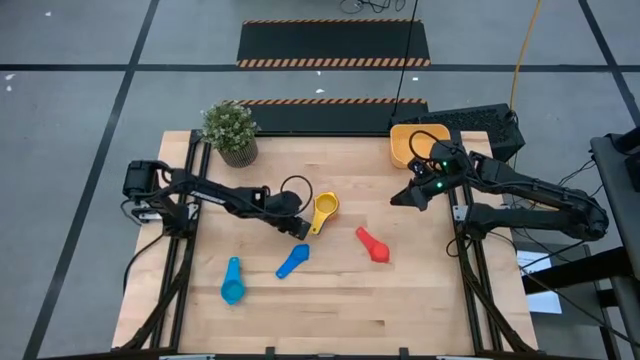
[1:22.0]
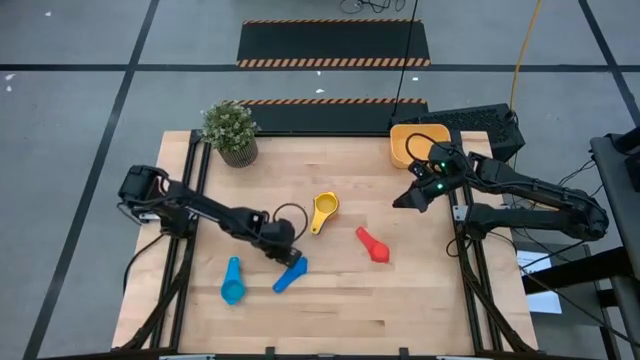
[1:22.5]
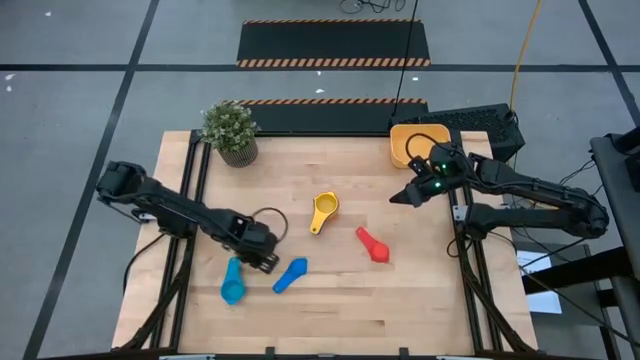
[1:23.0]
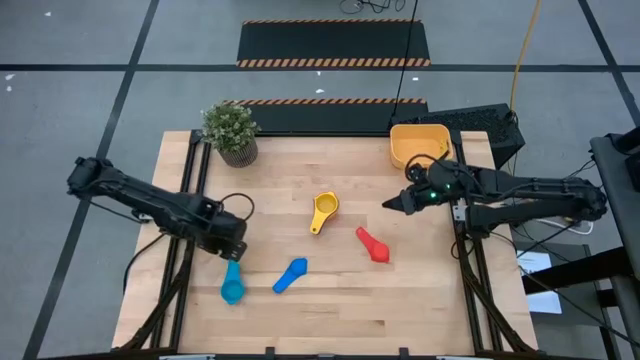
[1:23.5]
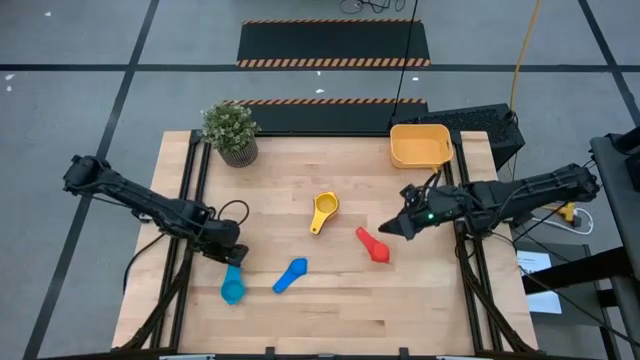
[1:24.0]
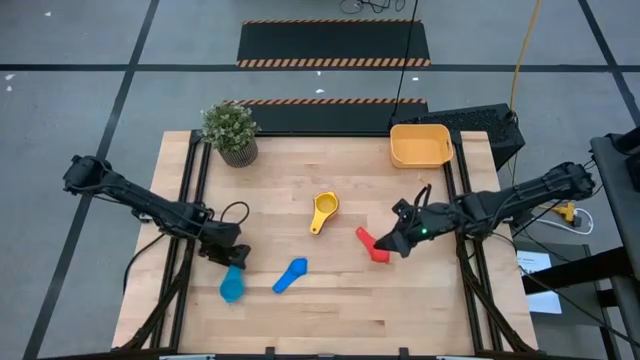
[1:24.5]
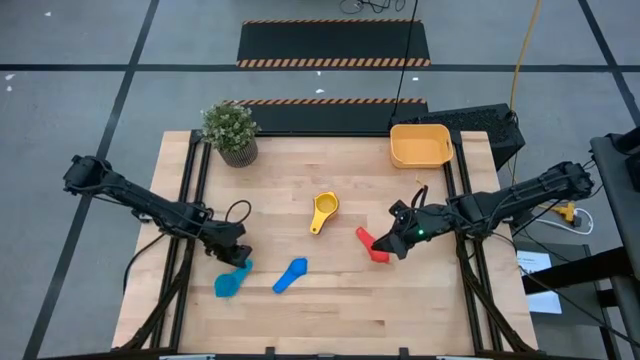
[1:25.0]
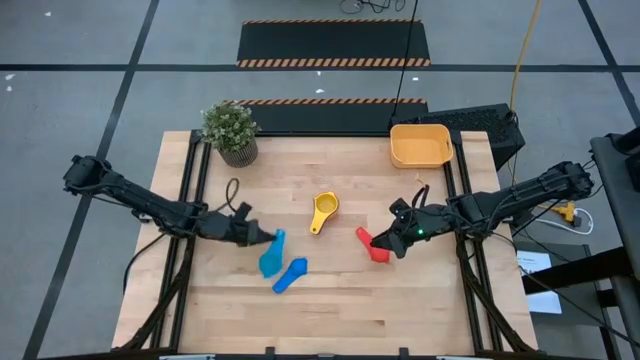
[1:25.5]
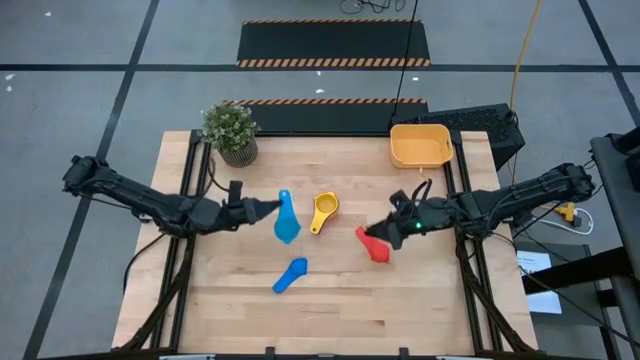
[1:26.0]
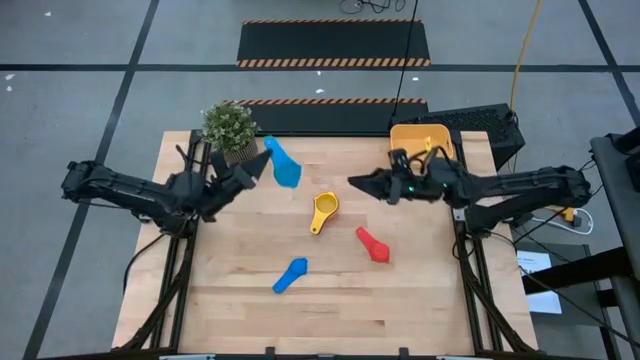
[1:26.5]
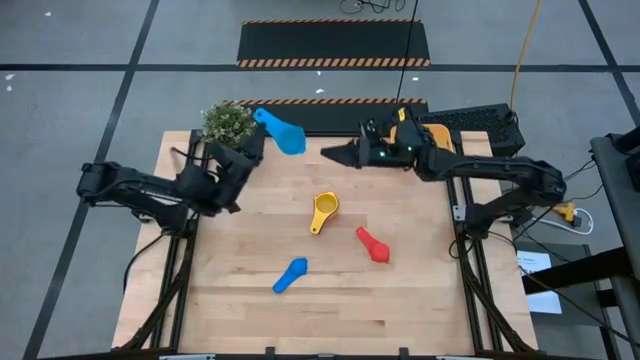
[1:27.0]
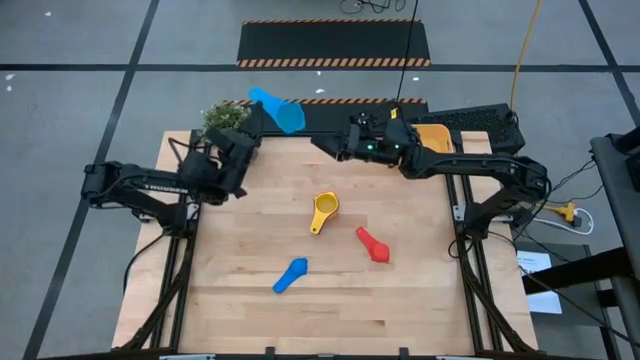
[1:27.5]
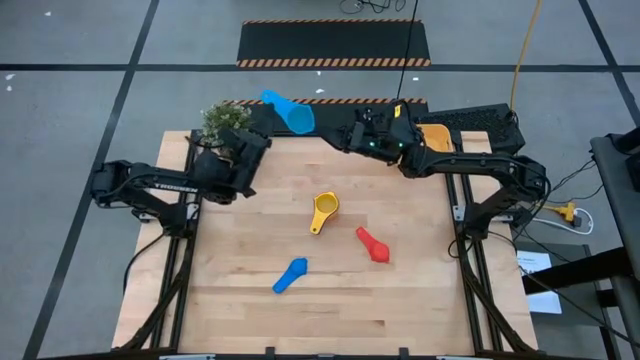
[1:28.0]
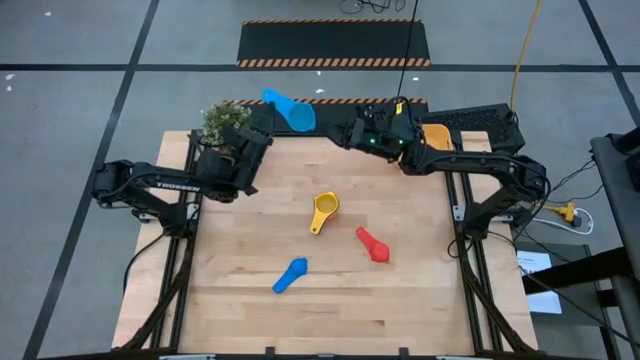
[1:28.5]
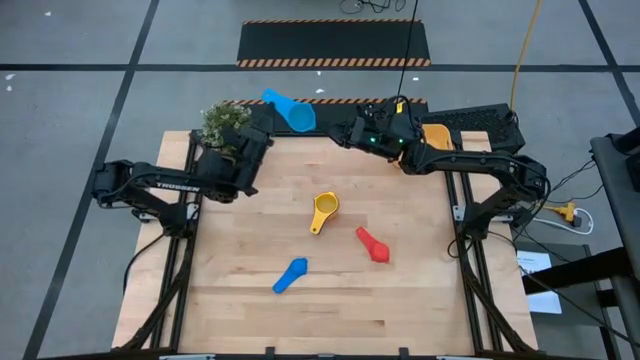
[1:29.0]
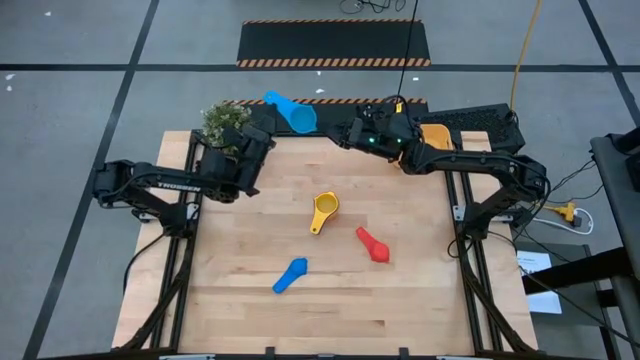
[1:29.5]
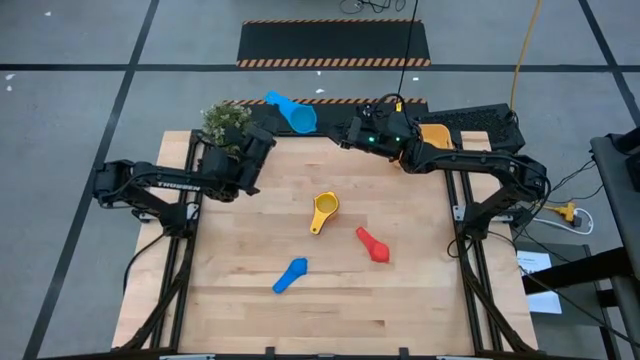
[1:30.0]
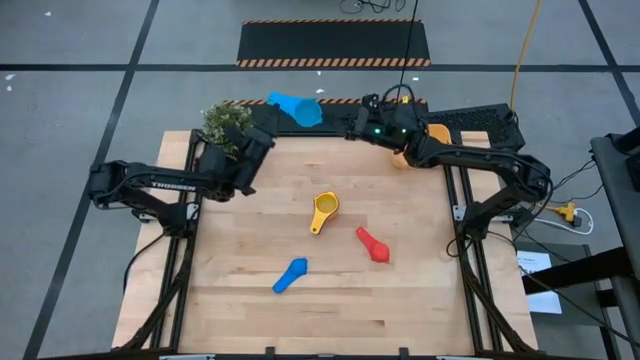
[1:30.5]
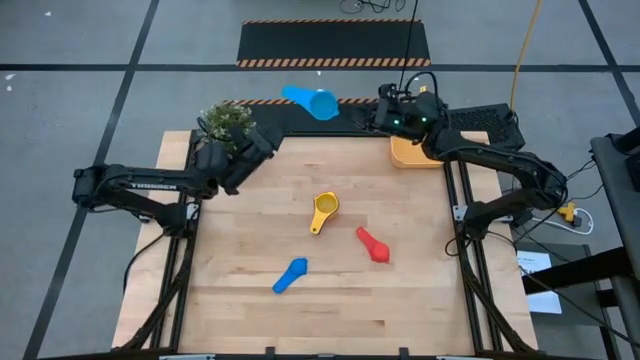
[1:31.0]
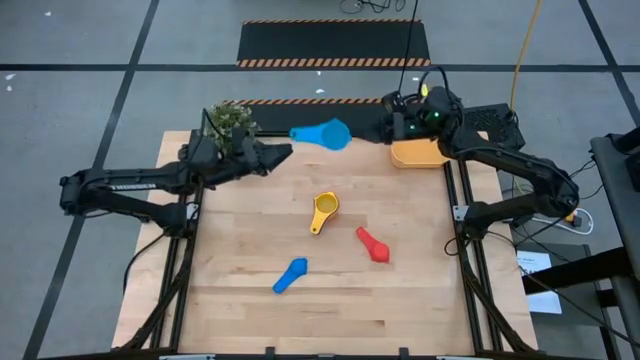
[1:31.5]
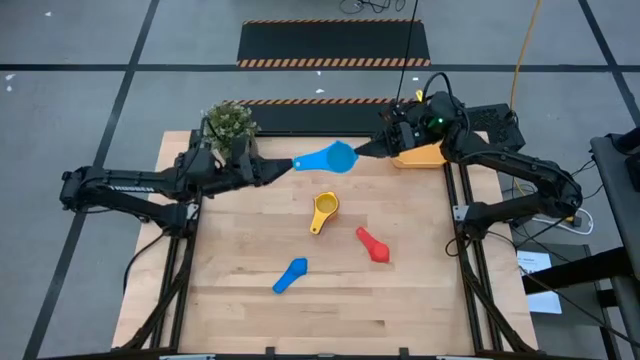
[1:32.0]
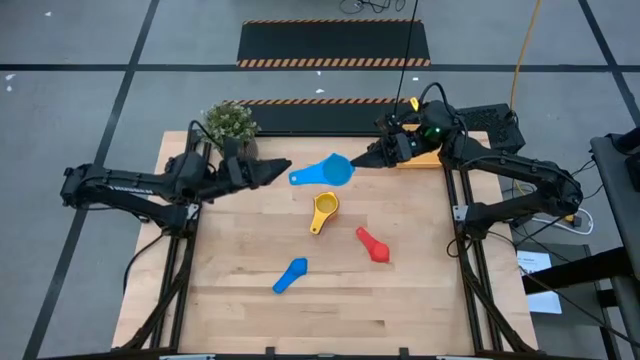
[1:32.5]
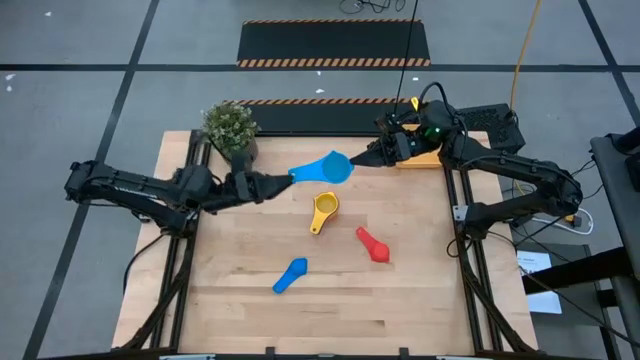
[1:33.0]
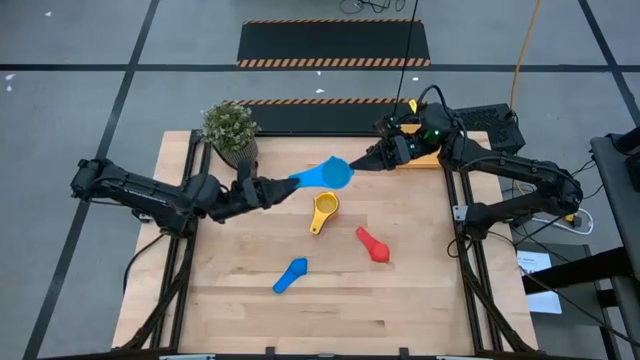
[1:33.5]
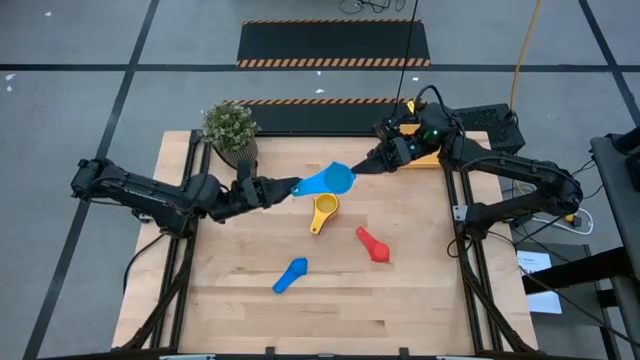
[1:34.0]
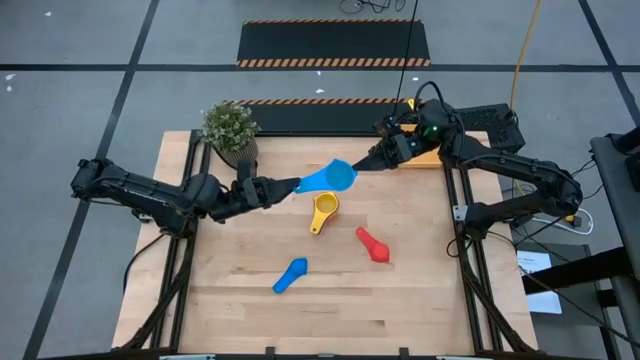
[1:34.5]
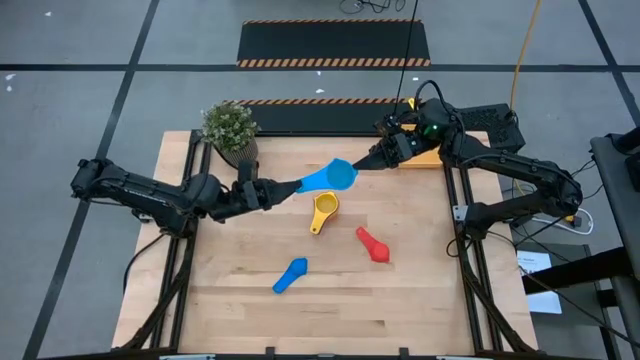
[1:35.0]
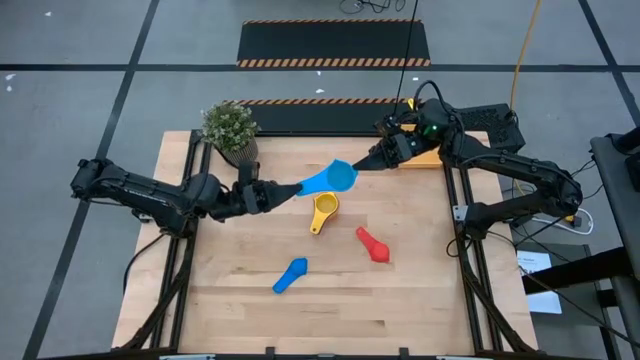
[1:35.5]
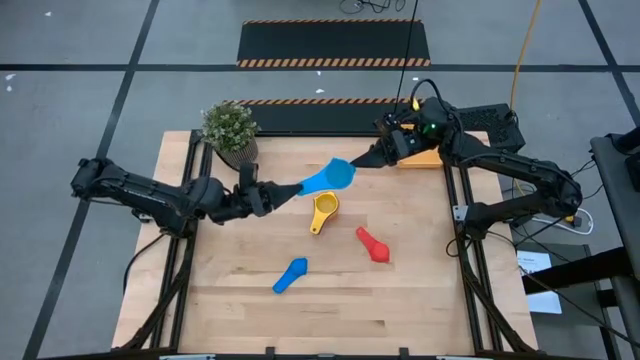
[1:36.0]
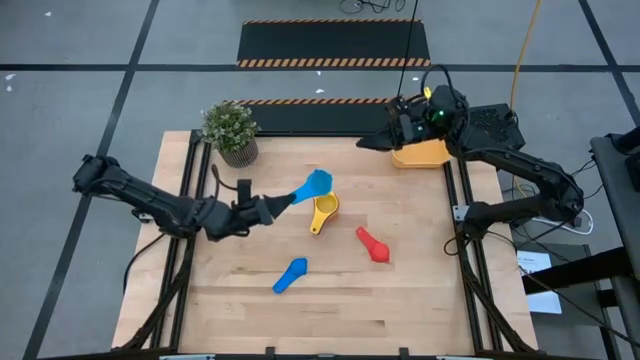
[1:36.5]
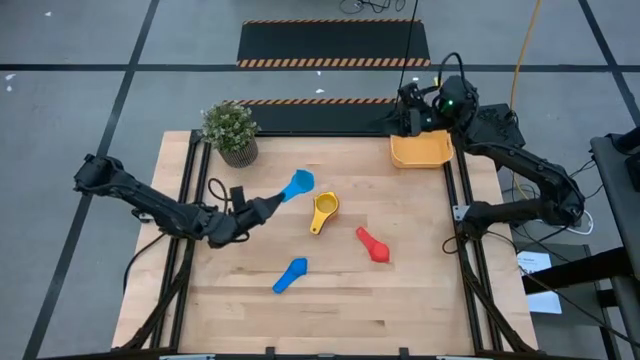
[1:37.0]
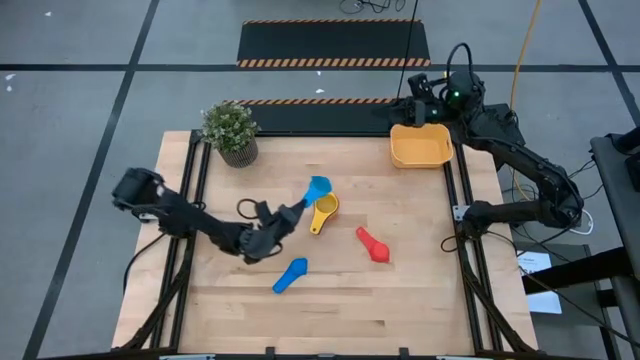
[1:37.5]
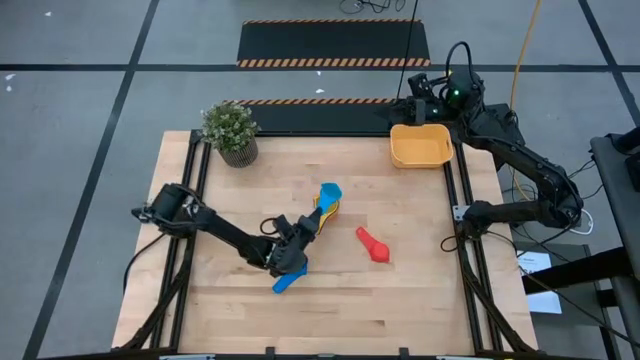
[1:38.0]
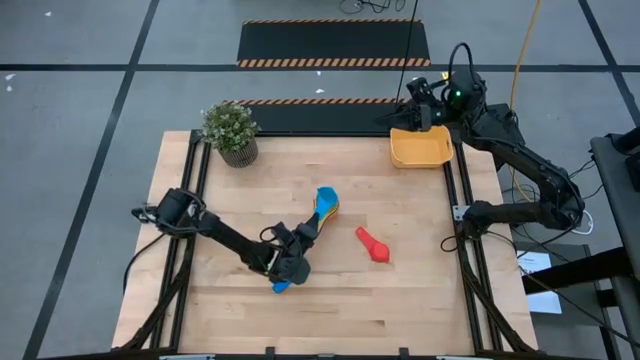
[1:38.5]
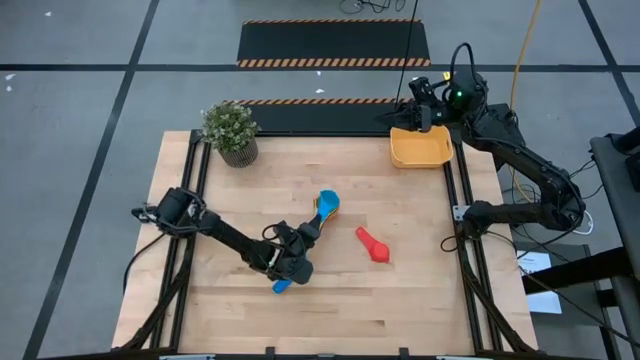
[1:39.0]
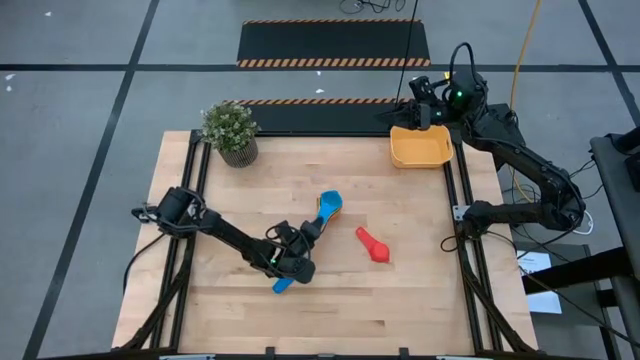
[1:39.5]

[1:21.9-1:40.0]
Task: Nest measuring cups in basket
Stack the light blue measuring cup on top of the yellow measuring cup

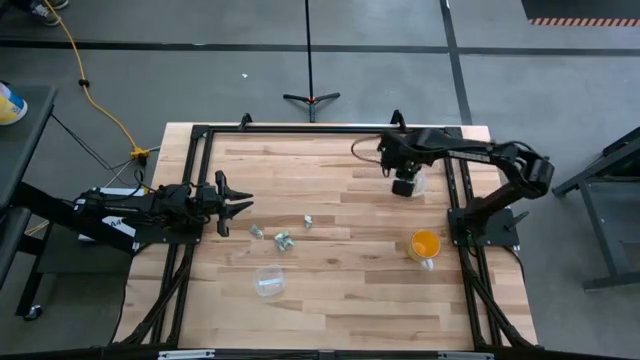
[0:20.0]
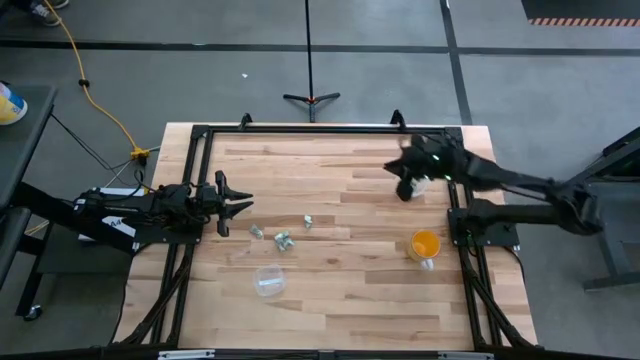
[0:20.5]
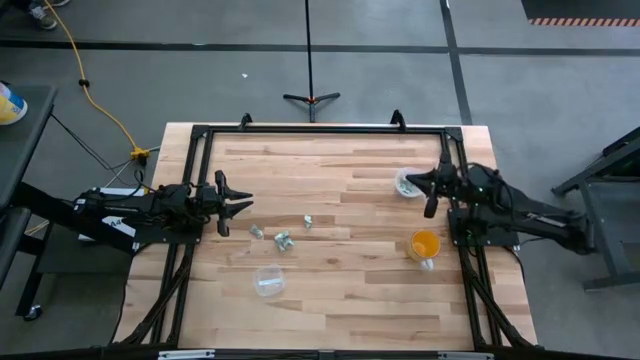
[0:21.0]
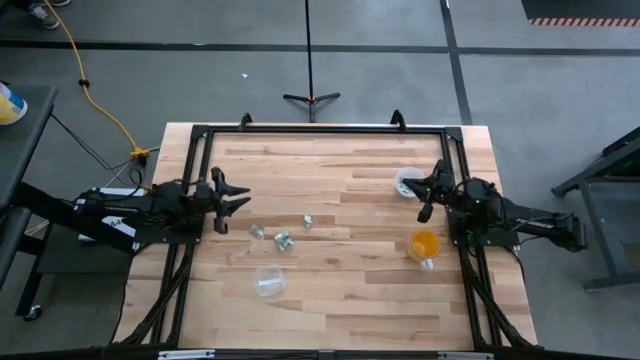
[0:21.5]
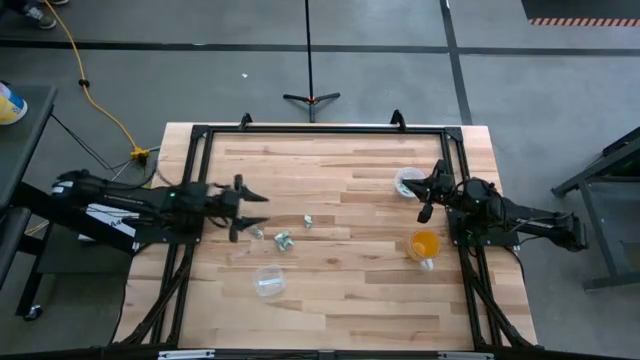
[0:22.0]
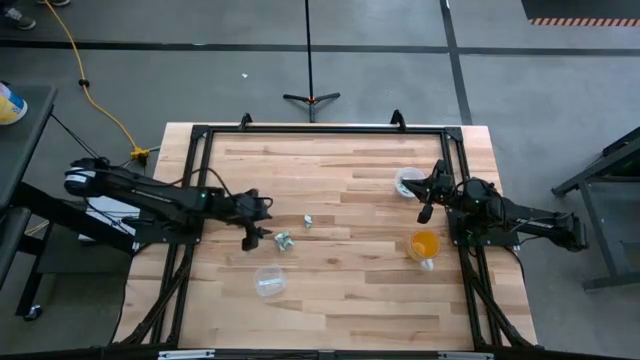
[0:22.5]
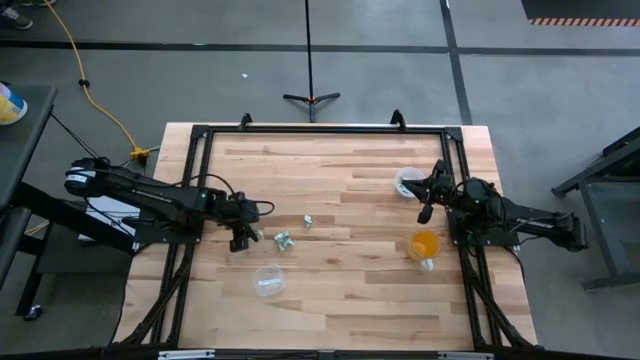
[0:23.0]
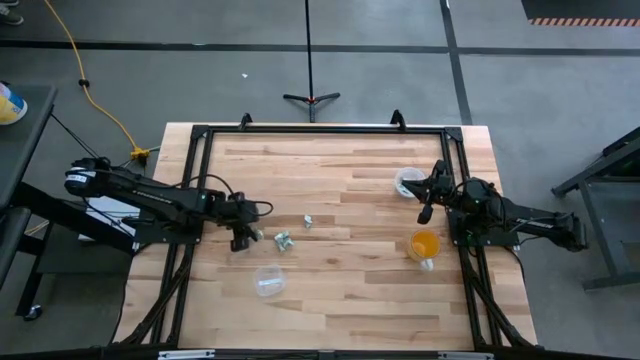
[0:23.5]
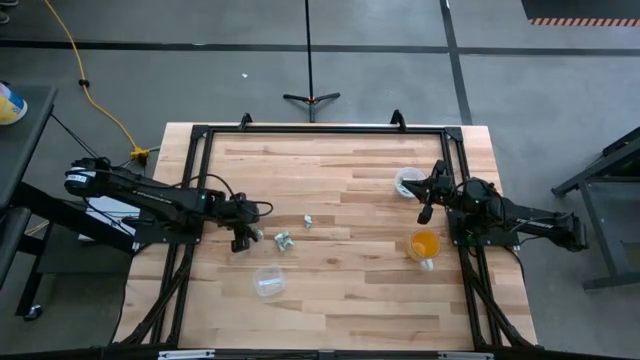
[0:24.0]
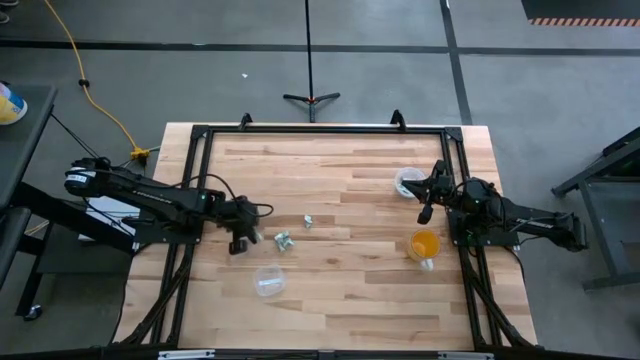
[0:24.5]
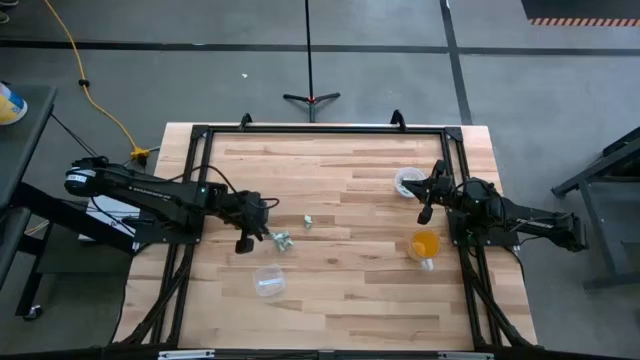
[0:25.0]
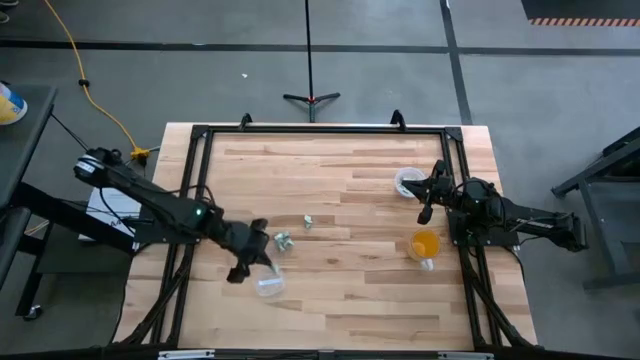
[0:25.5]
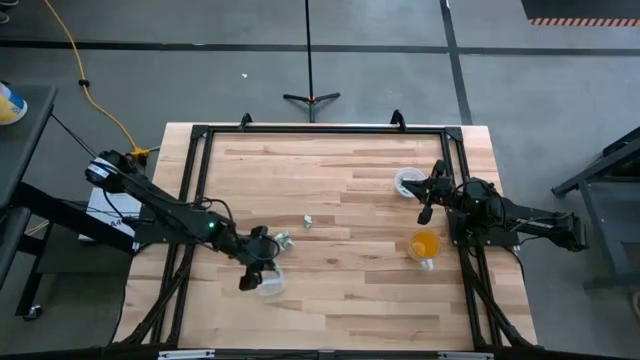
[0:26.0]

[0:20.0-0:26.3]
Task: Pick and place Stevia / Truvia into bins
Put the stevia packet into the square container
